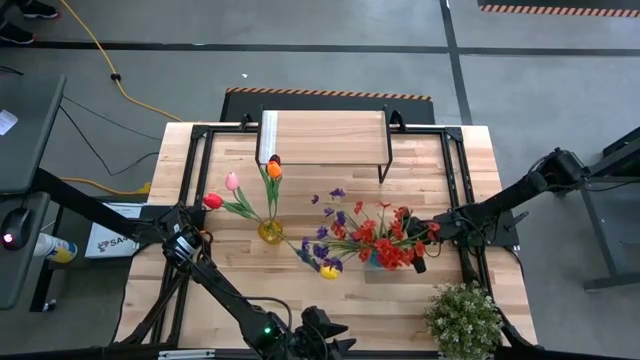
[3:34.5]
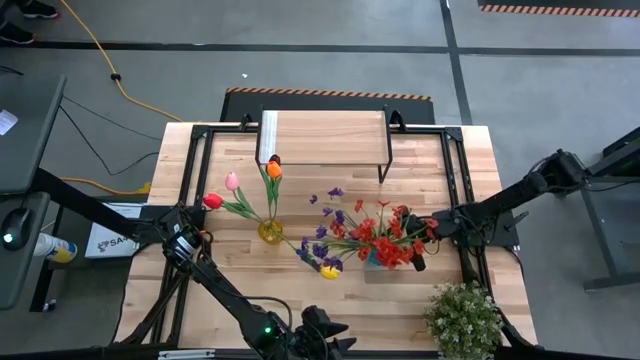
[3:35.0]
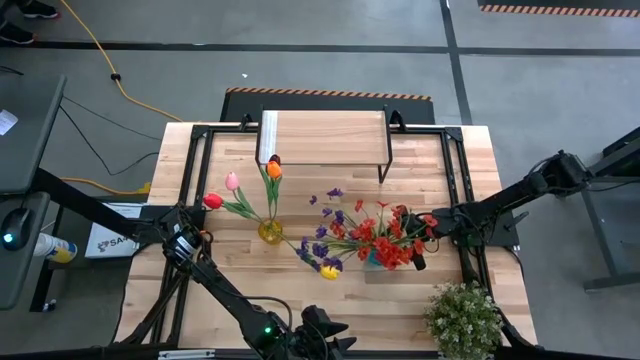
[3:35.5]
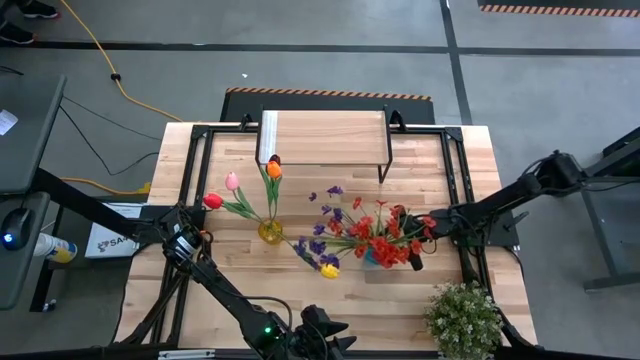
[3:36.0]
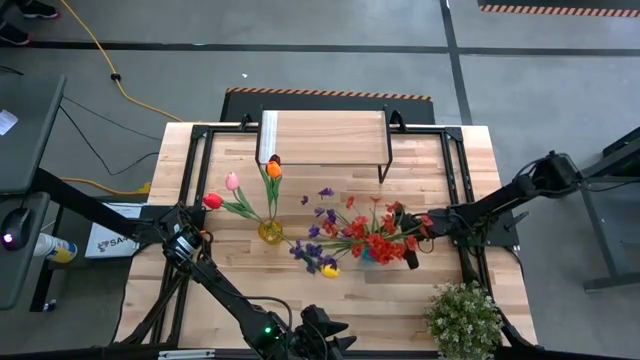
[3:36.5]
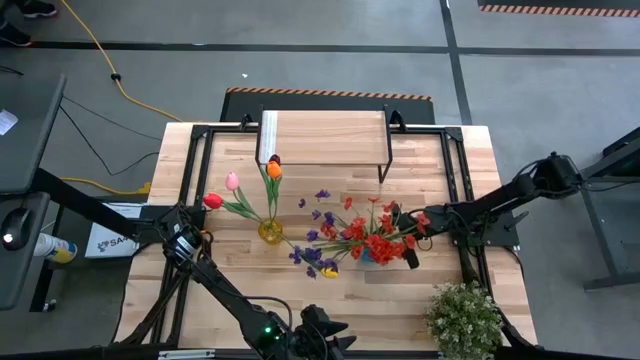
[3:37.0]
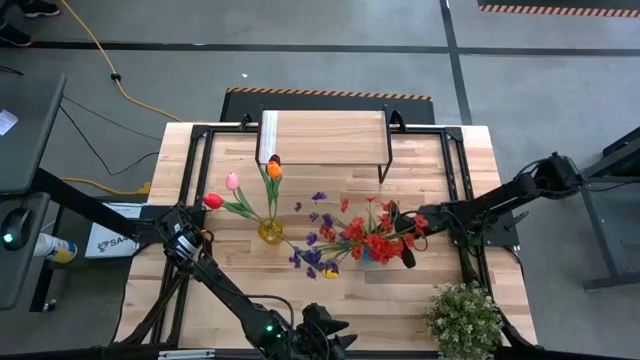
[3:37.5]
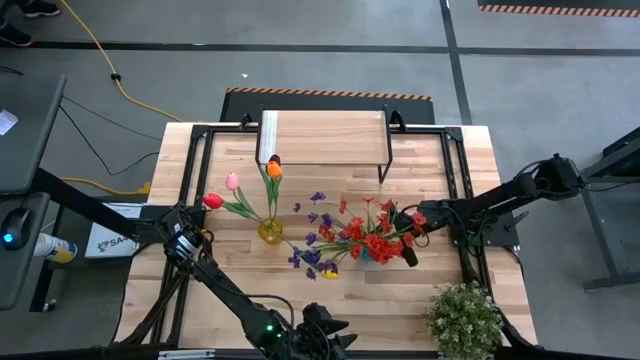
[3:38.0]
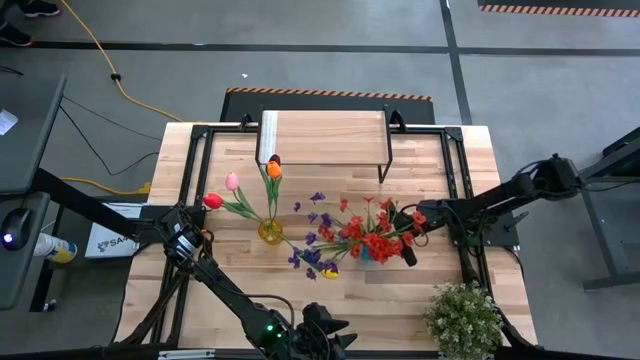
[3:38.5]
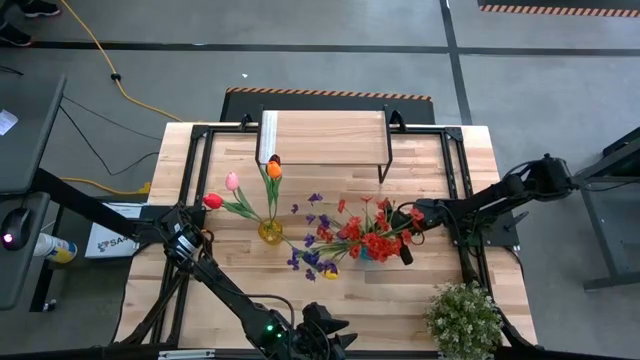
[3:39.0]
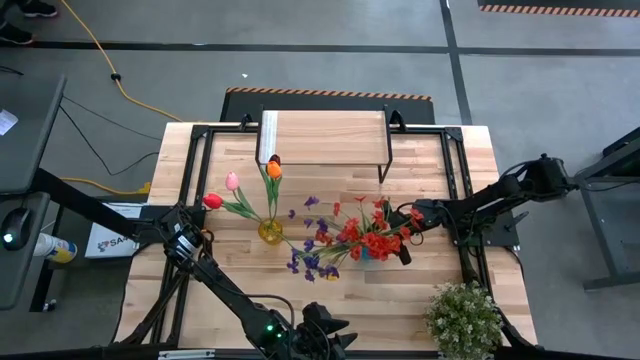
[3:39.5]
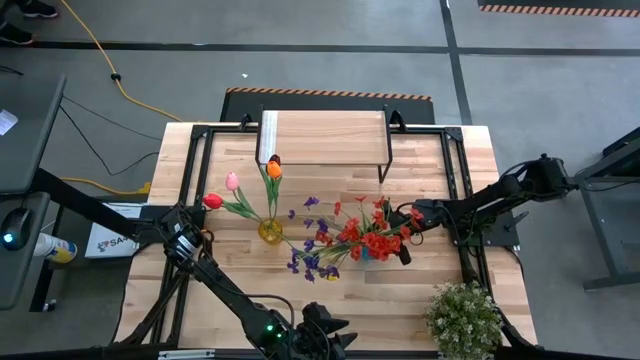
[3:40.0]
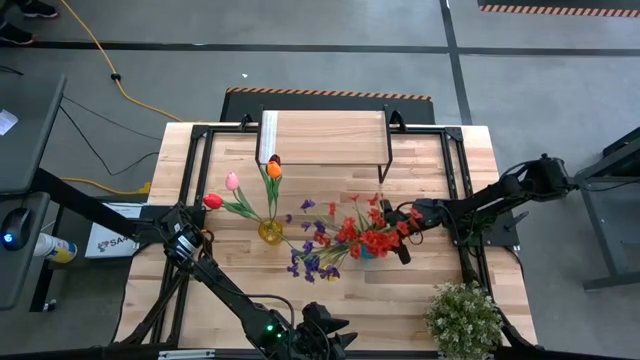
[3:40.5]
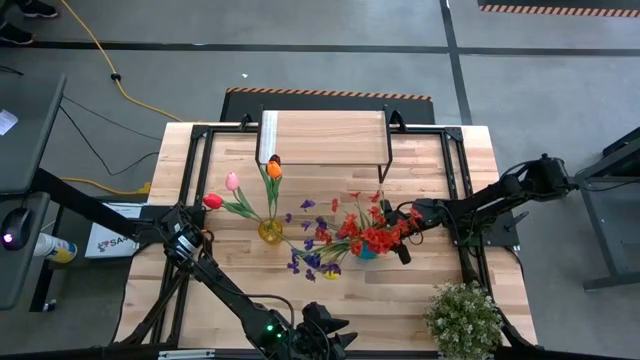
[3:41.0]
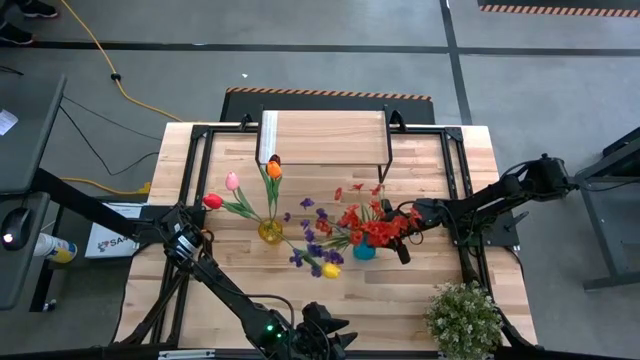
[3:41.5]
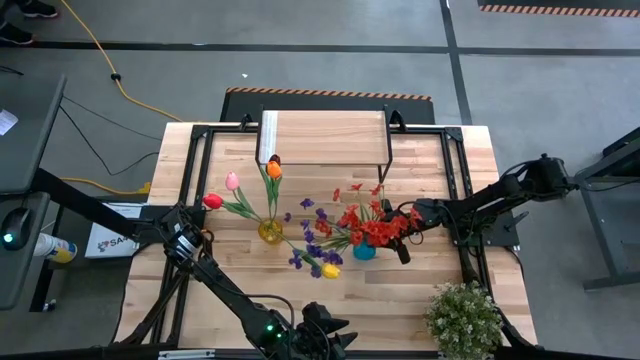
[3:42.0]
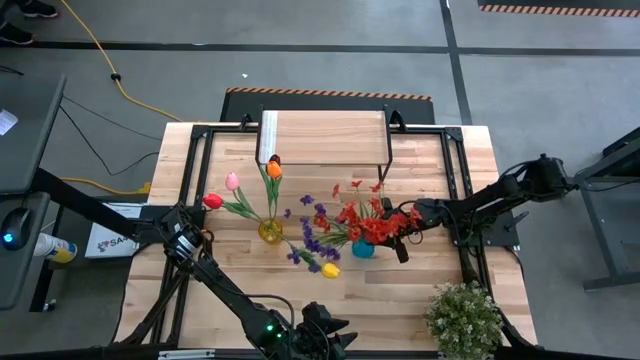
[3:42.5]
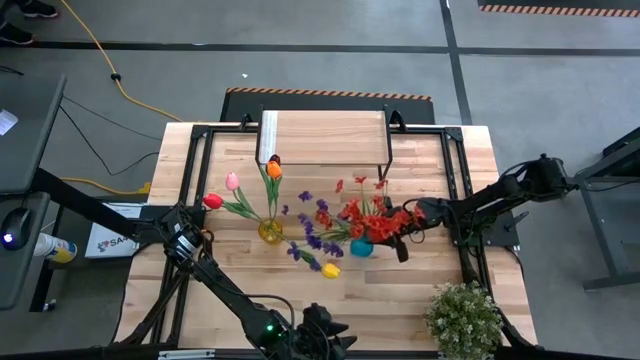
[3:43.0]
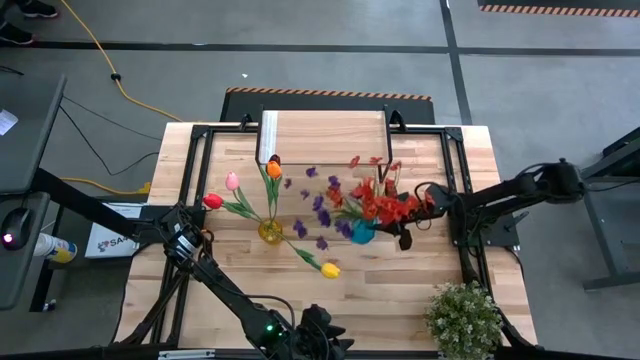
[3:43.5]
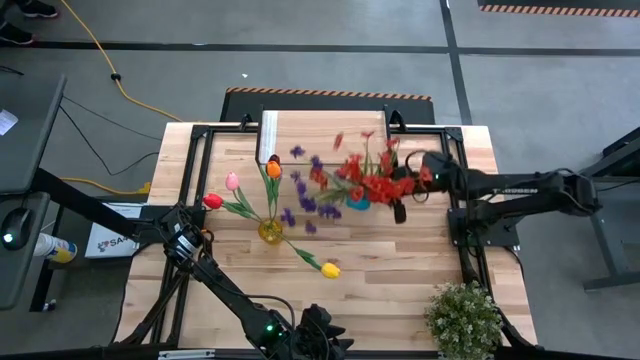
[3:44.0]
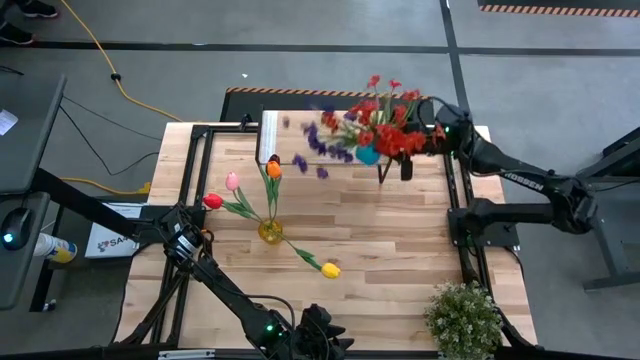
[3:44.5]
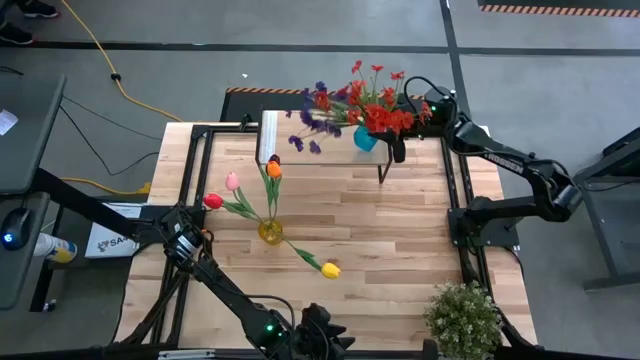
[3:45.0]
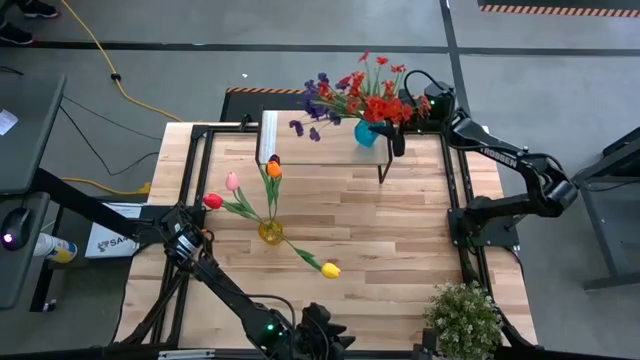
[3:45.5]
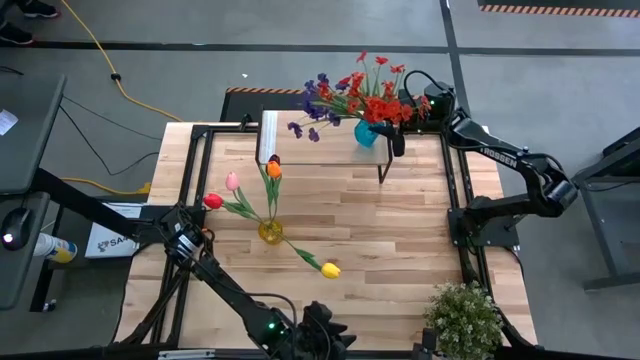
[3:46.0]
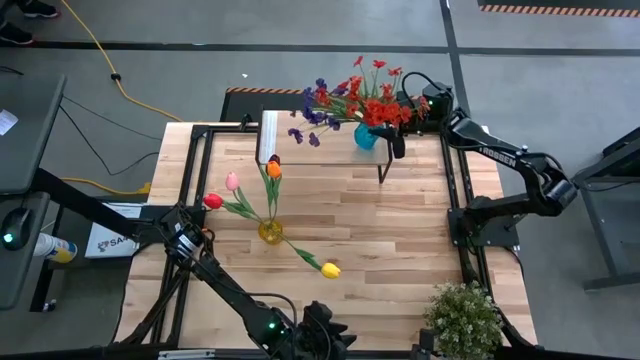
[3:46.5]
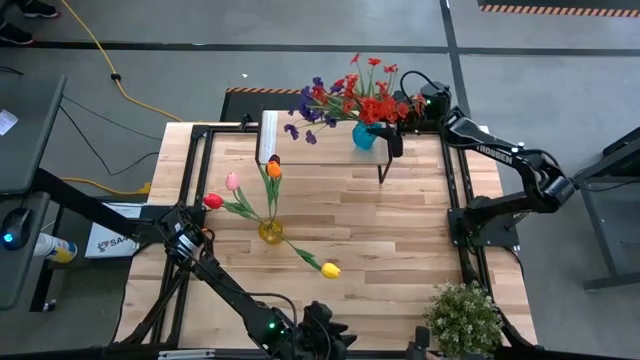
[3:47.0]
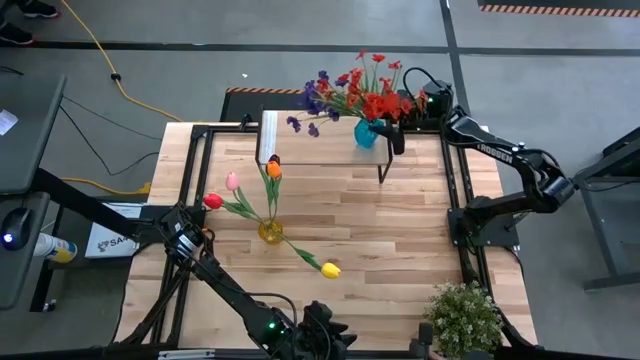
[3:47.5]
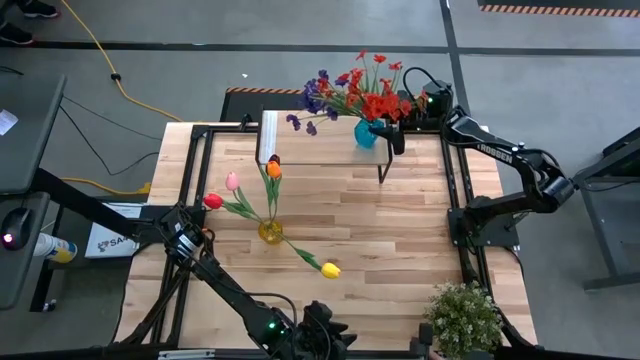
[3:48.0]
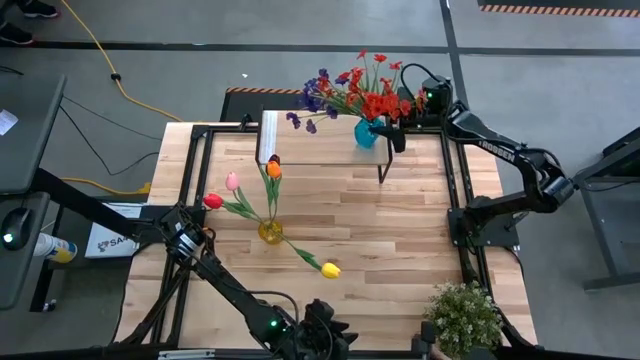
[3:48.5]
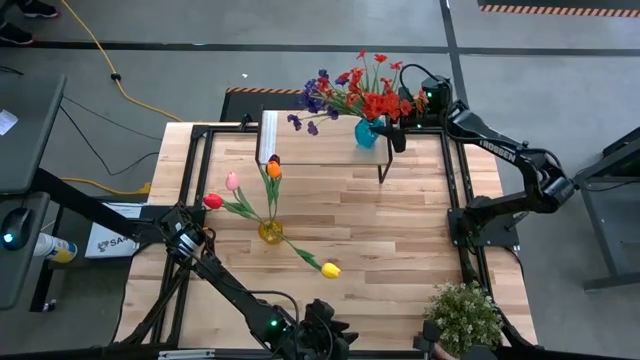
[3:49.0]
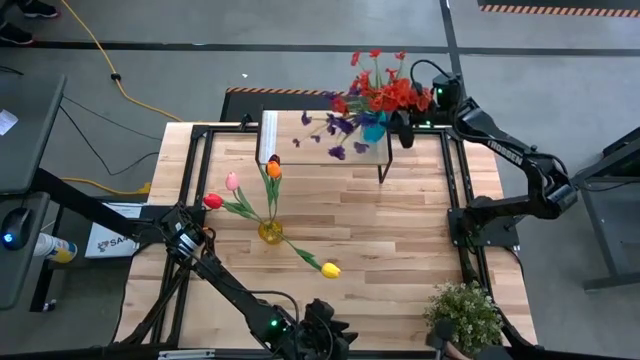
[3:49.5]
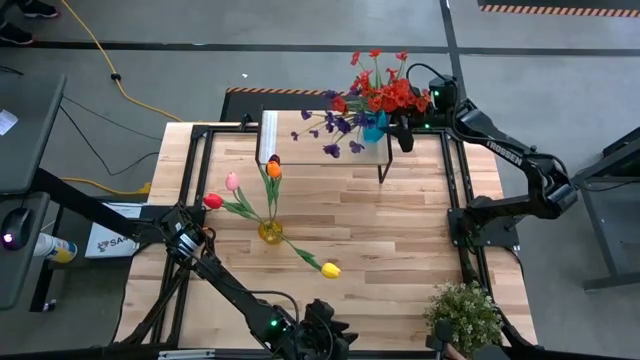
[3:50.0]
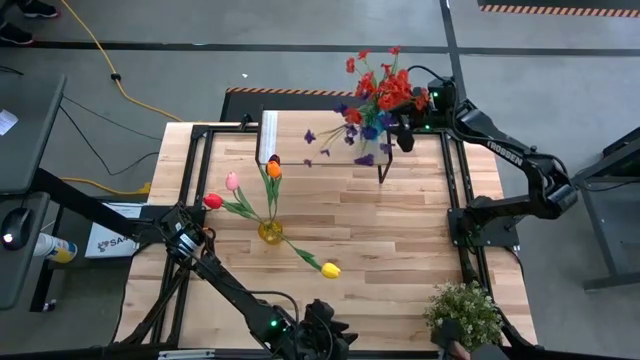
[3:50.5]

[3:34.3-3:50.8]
Task: Pick and place flowers into a vace then onto a shelf
Put the blue vase with flowers on the shelf

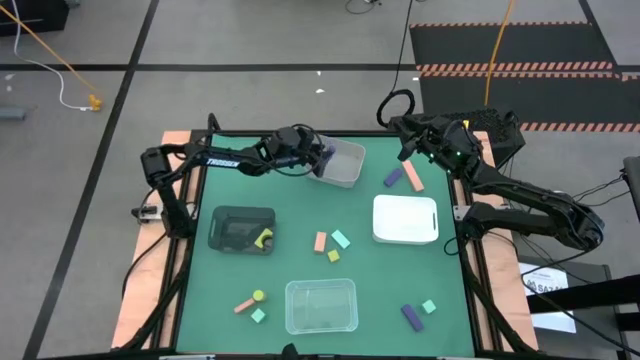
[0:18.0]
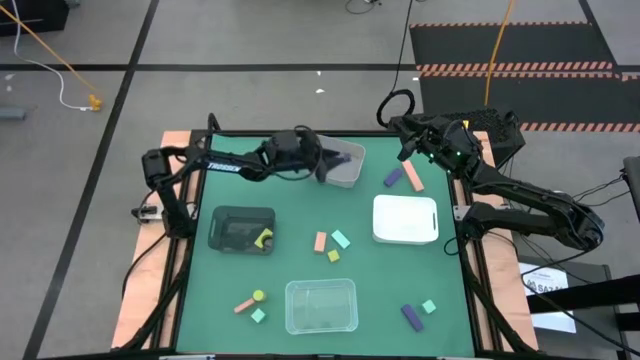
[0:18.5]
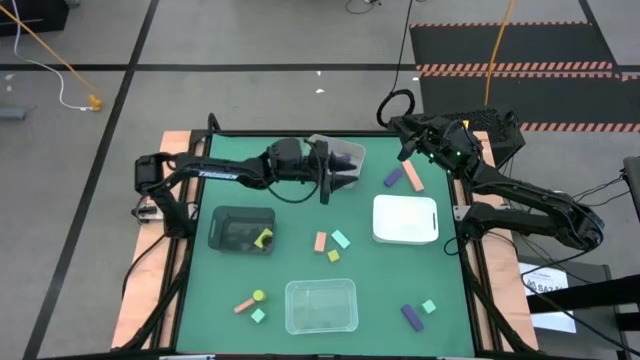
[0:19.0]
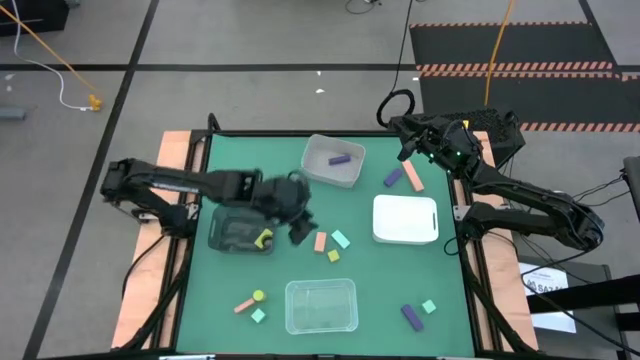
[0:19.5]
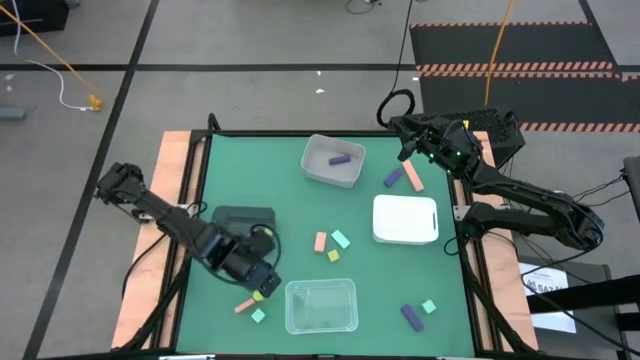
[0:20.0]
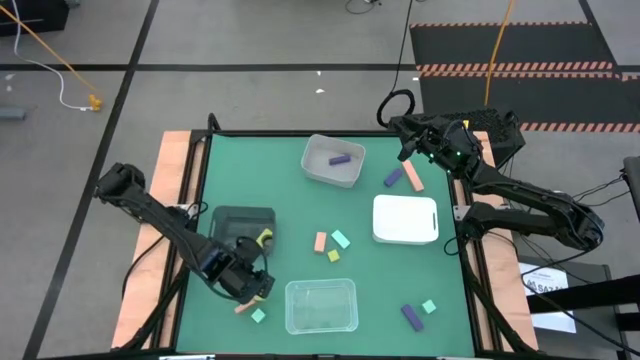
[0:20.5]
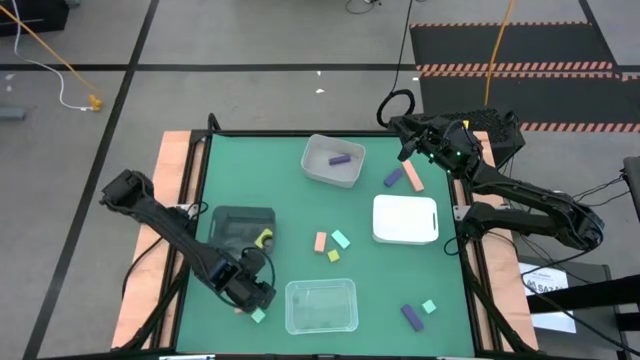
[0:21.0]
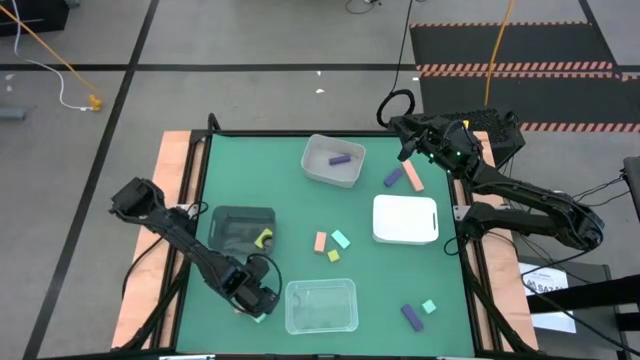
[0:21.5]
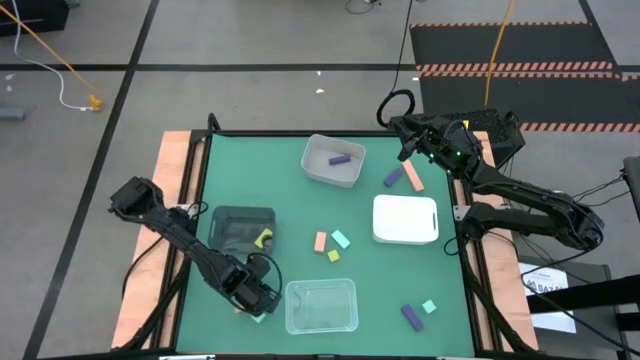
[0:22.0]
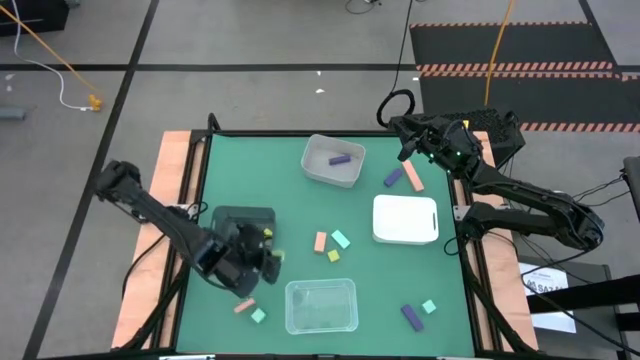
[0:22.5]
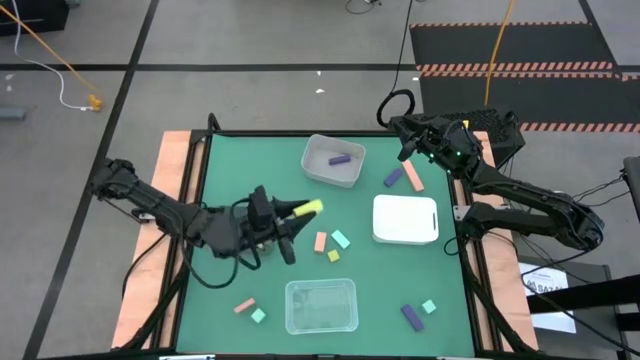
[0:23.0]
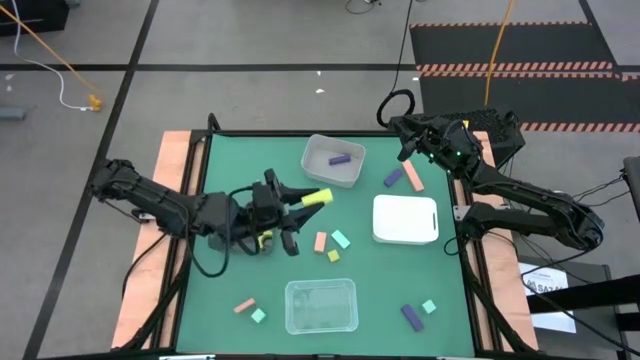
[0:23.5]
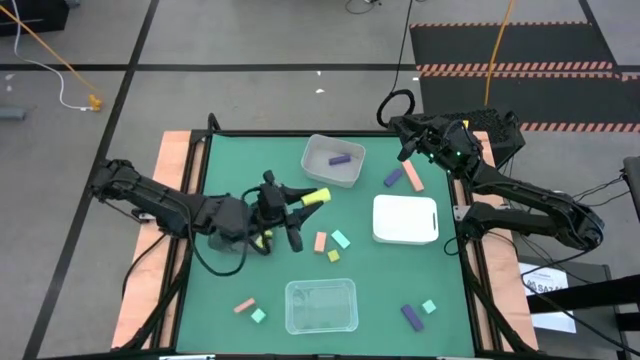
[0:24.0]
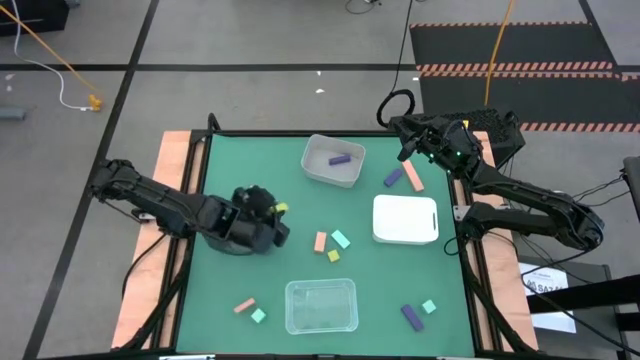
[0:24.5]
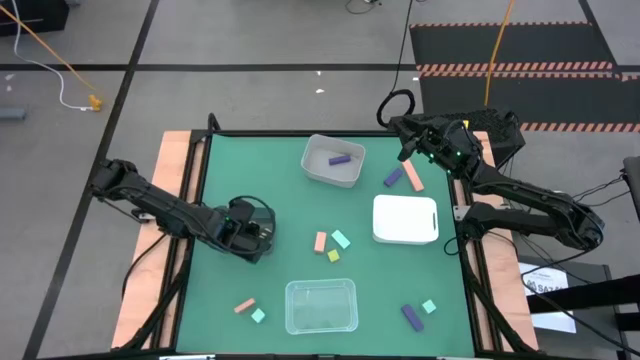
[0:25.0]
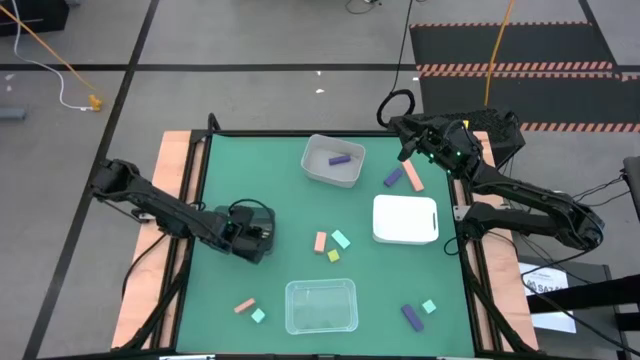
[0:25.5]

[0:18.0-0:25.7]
Task: Sort & place blocks by color
Put the left light orange block into the black bin
